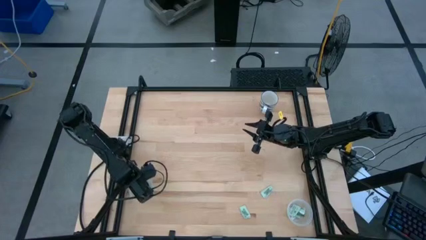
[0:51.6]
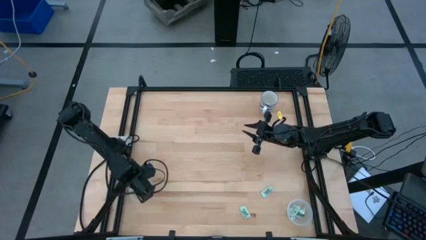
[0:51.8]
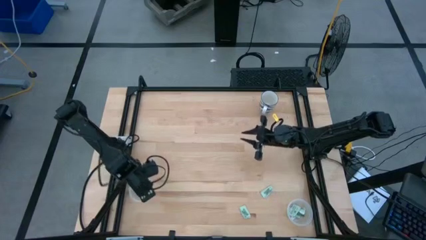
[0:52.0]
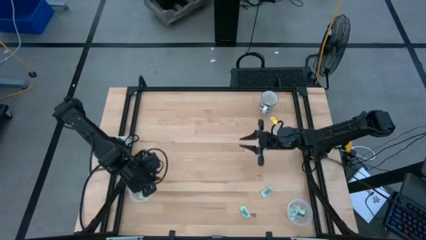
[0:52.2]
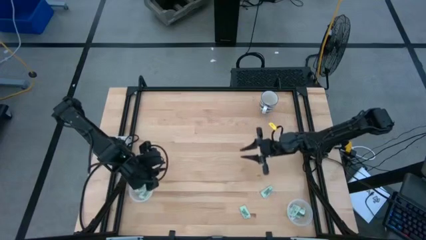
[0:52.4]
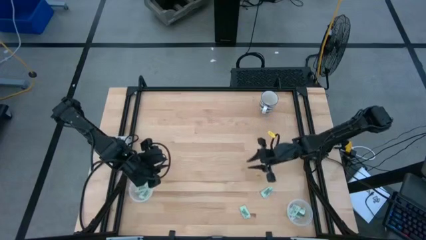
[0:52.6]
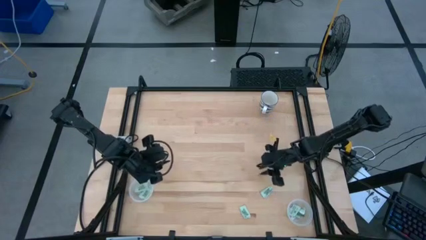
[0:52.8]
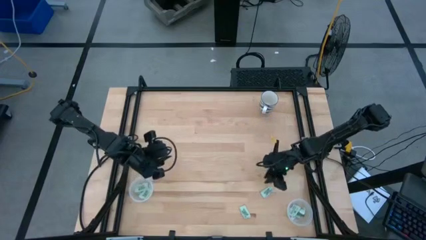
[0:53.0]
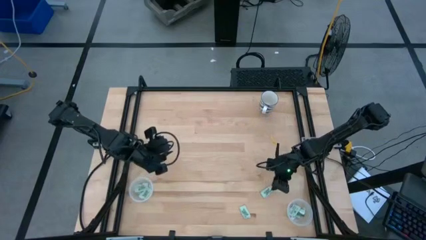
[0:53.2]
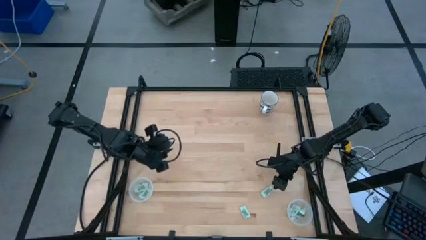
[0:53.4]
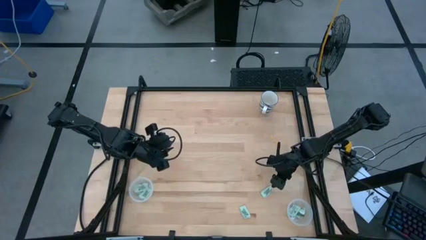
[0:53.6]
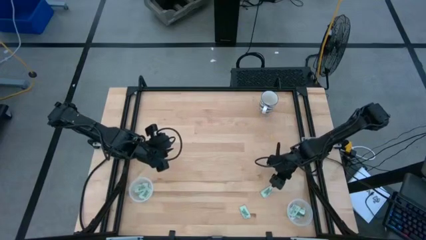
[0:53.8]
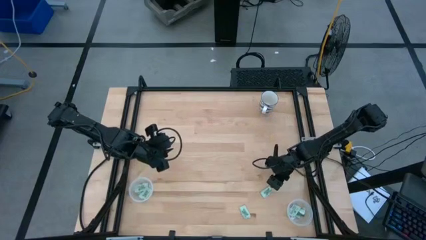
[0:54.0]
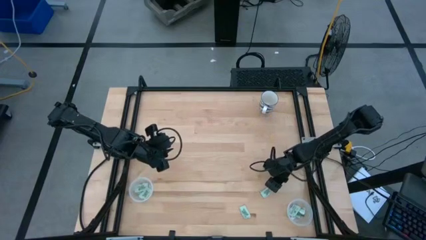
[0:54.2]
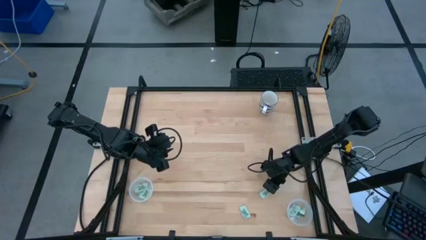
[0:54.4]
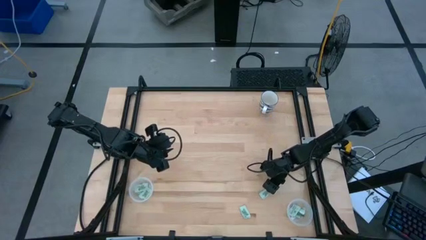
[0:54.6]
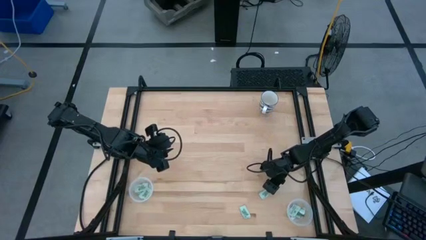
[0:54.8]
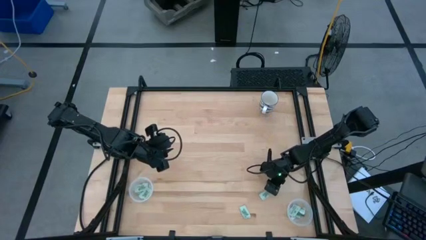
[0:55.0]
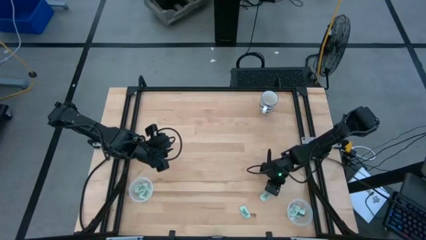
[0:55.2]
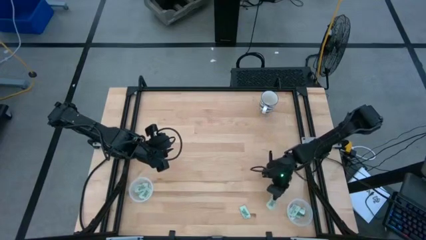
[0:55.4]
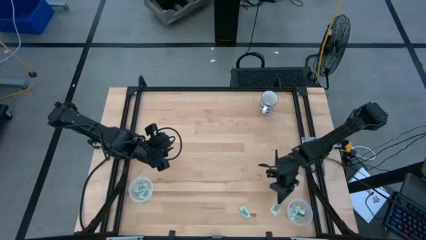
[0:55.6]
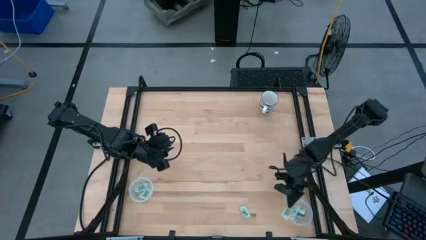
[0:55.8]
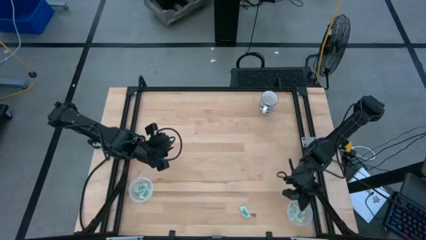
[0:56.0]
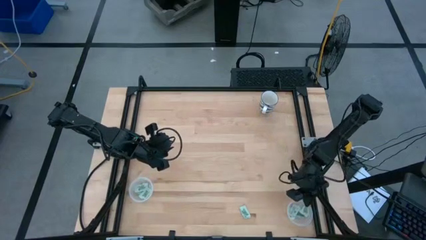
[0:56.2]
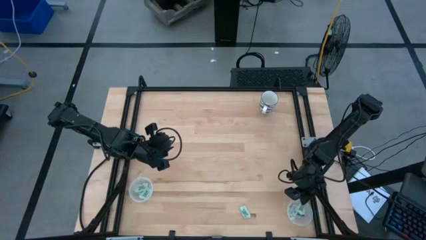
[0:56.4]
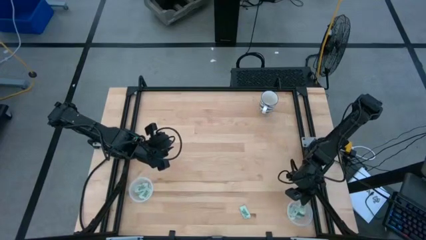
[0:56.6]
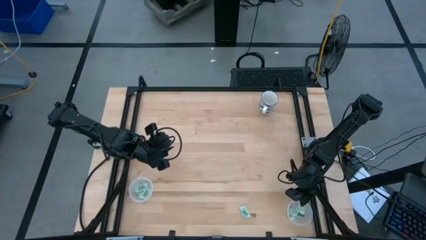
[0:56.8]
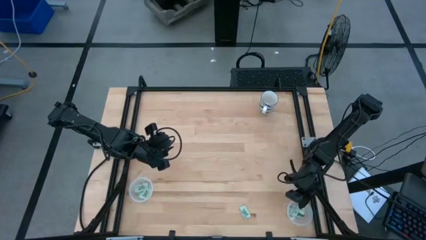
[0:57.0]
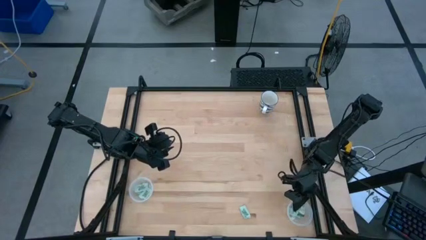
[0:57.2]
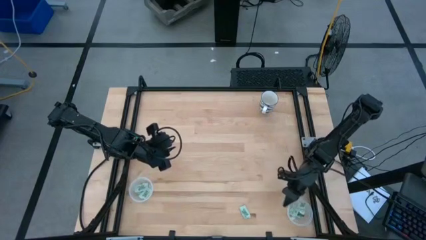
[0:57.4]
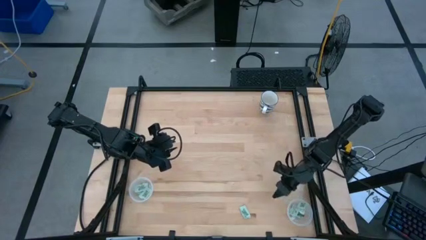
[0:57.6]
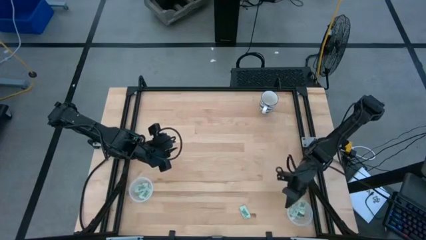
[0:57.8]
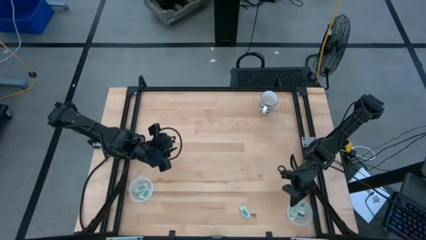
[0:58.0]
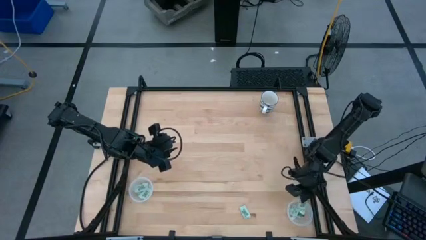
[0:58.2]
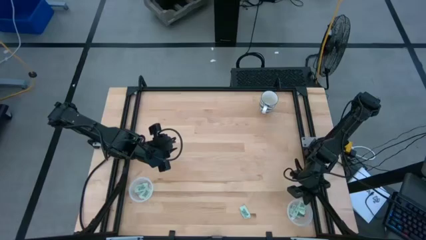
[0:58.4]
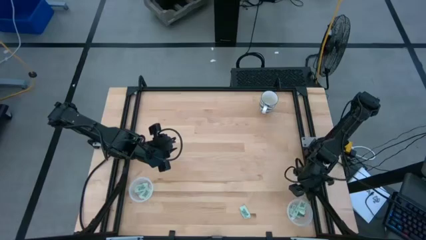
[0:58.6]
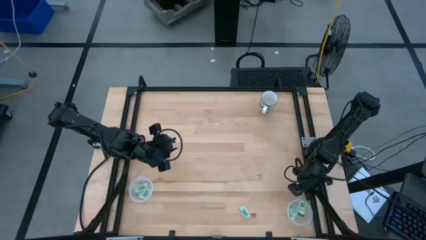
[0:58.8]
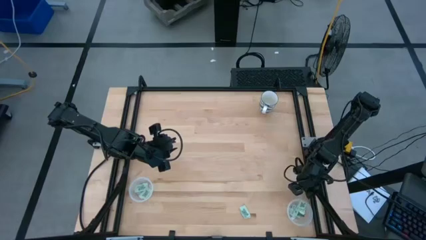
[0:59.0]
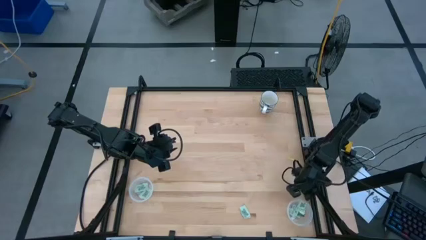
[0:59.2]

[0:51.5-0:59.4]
Task: Pick and place Stevia / Truvia into bins
Put the stevia packet into the bottom transparent container

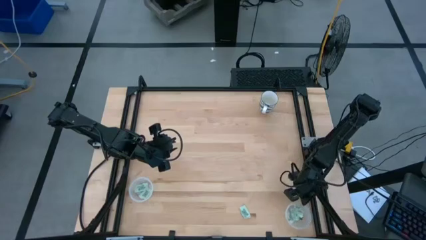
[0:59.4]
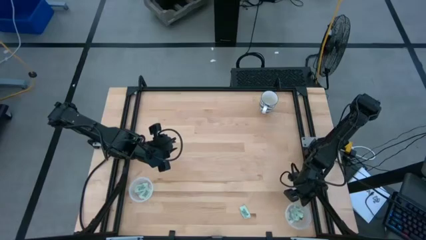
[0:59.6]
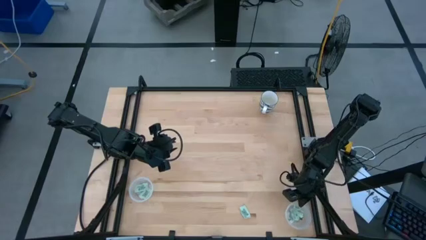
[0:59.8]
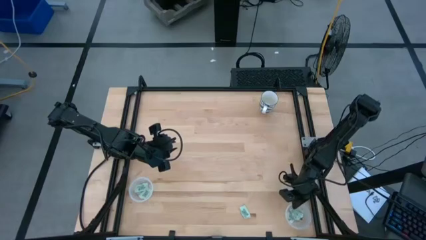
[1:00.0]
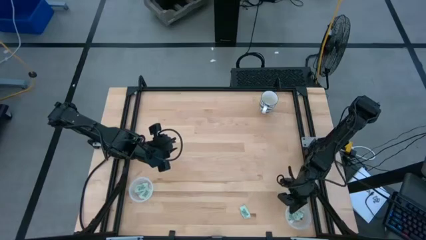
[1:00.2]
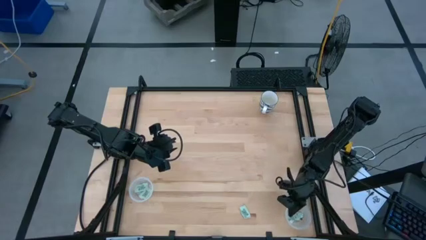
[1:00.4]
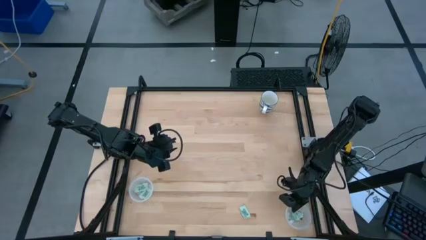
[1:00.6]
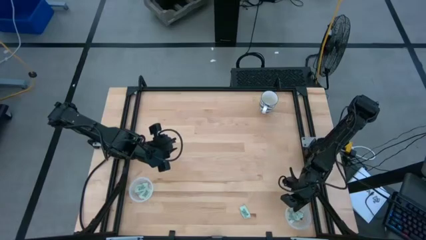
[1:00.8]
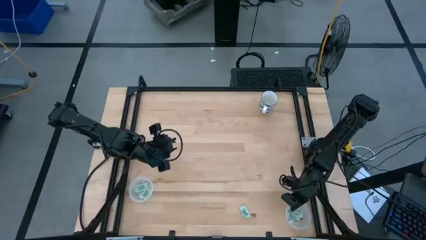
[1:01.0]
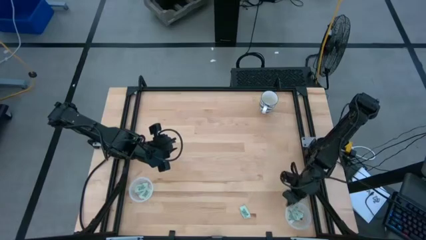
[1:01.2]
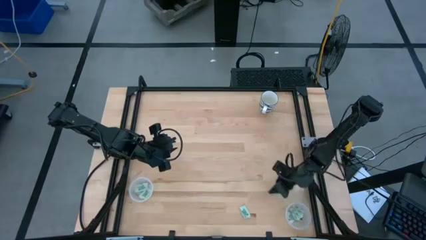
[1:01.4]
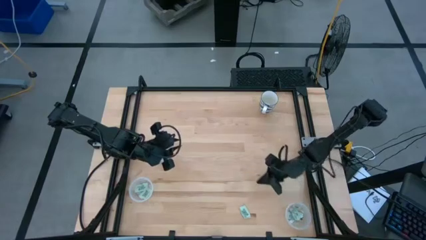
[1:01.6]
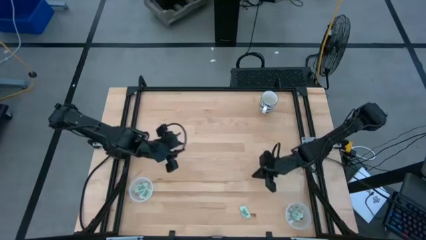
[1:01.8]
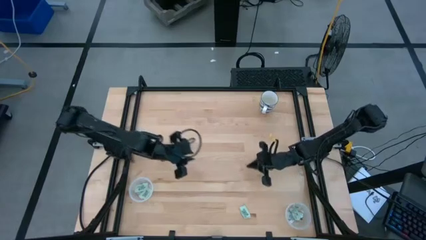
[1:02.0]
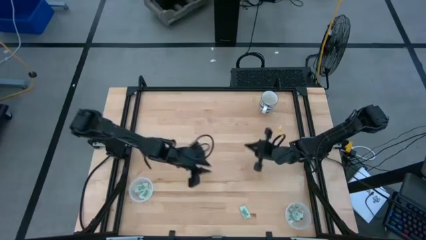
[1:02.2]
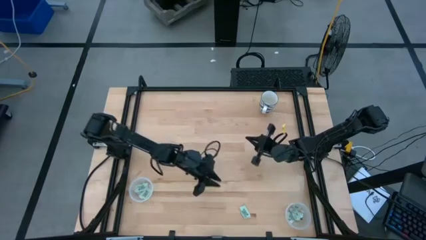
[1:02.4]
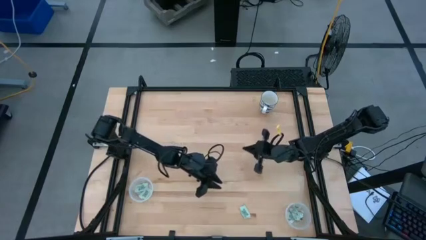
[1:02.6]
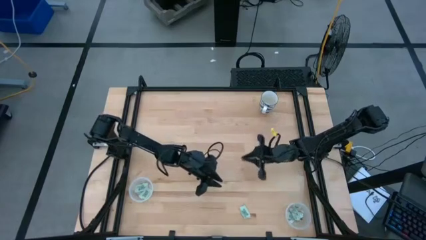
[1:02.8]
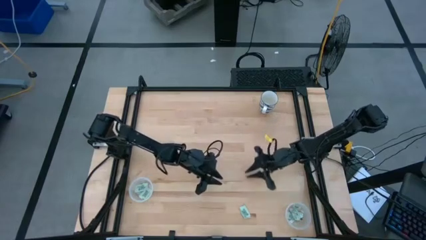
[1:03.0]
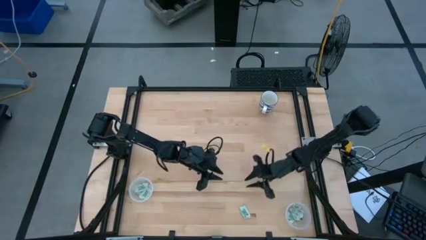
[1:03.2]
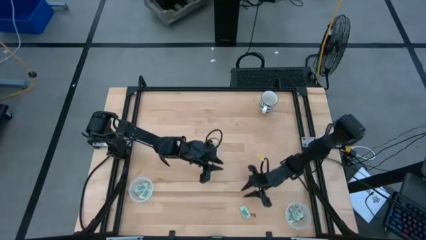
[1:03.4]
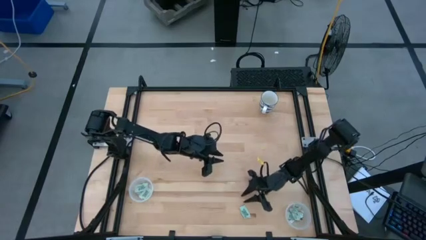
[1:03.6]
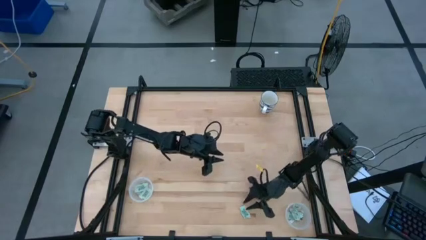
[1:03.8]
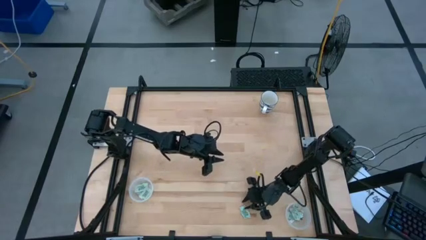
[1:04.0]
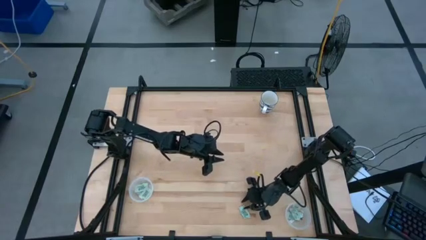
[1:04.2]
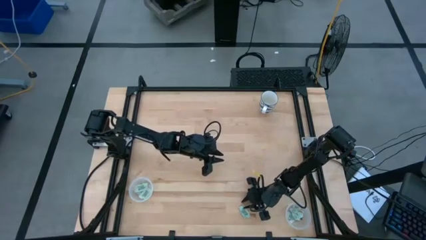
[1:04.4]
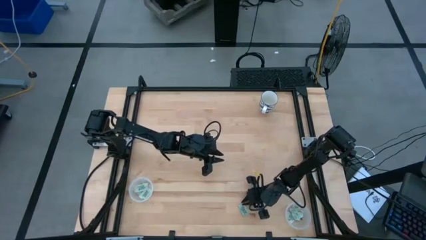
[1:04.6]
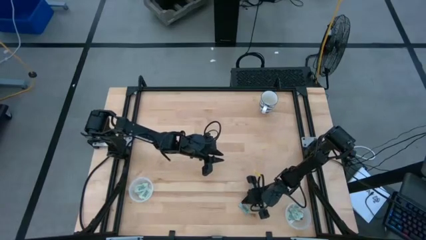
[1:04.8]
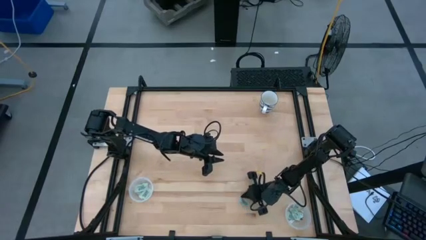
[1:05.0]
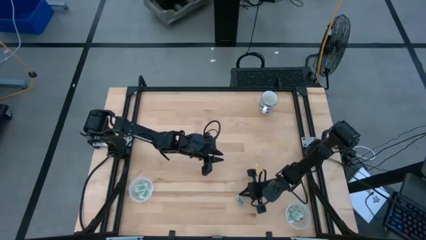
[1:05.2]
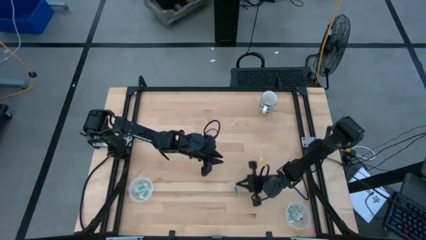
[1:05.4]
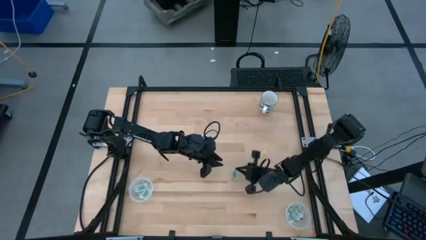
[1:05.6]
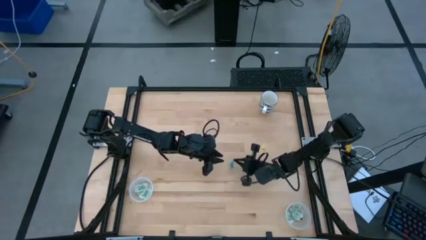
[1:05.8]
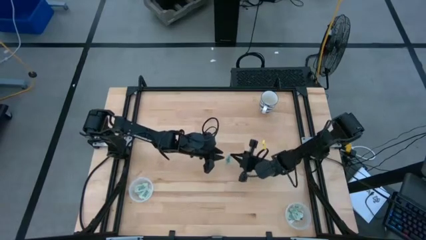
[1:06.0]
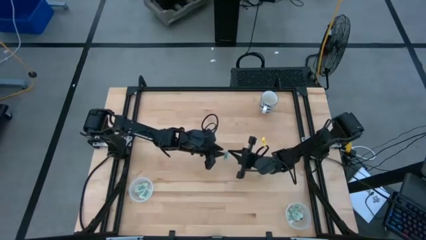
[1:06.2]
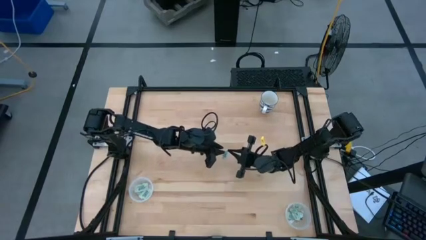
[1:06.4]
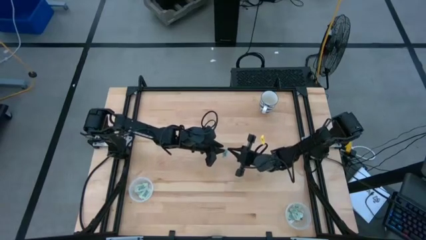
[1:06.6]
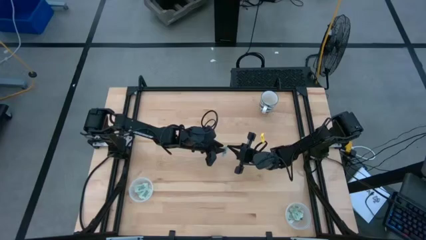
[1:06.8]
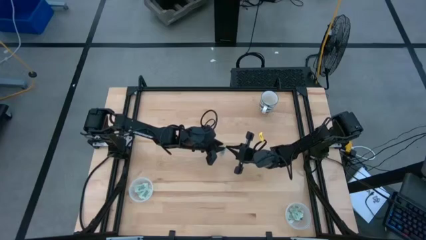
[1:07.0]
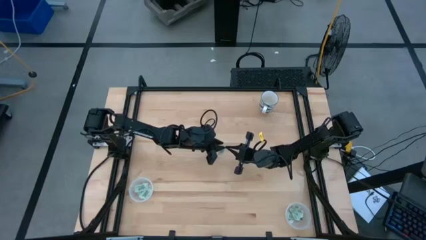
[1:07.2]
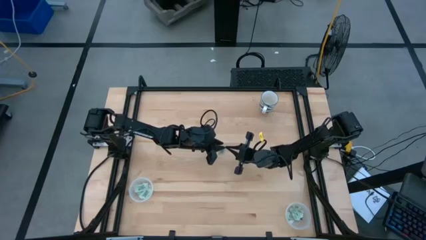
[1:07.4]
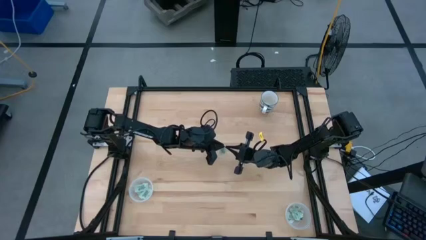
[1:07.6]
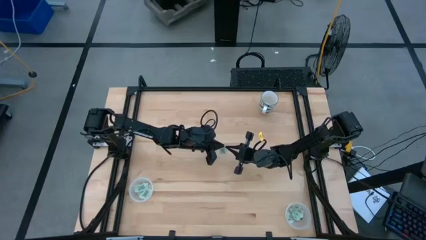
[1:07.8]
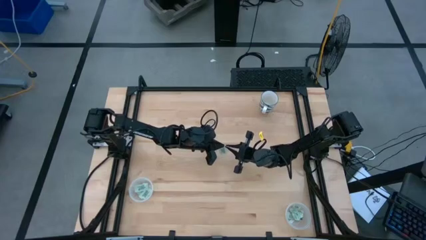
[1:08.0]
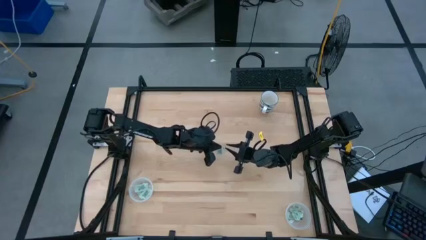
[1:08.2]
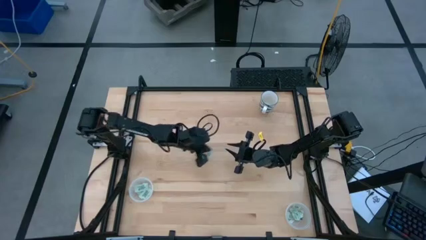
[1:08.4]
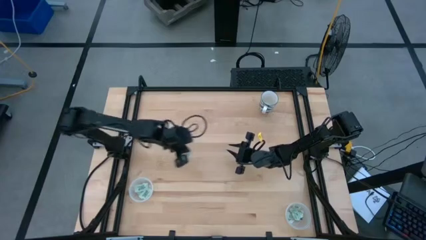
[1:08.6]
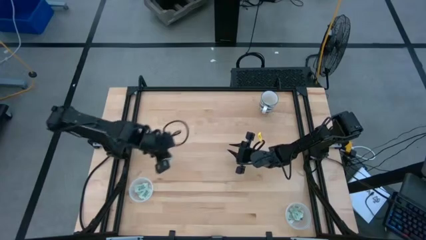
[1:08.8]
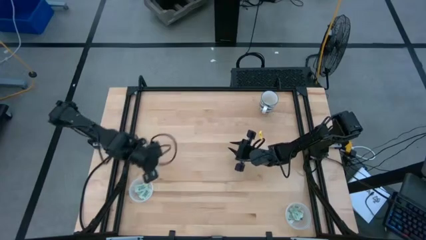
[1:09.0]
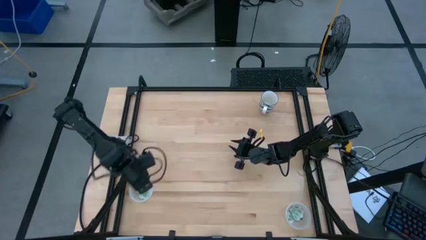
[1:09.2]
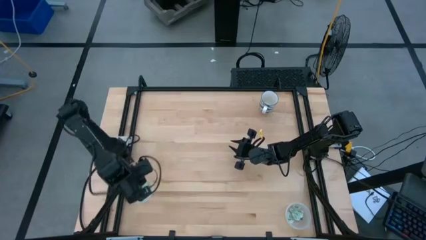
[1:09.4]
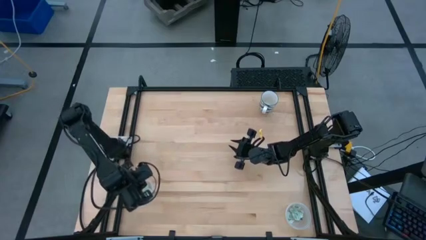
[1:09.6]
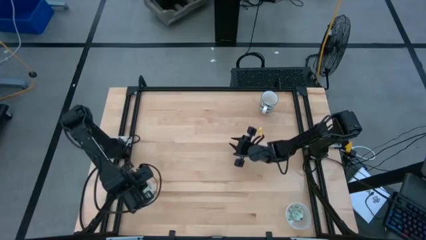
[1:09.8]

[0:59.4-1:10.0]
Put the stevia packet into the top transparent container
